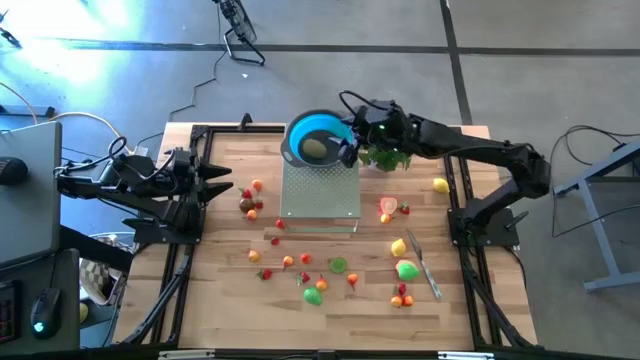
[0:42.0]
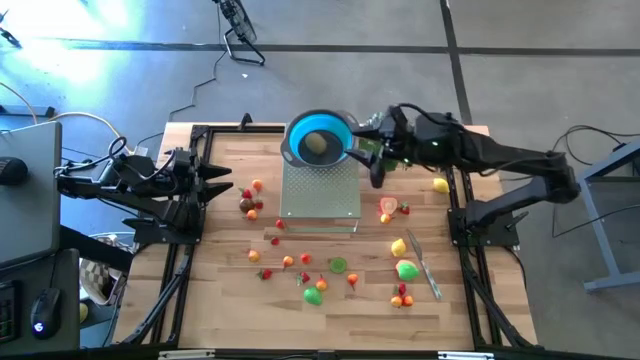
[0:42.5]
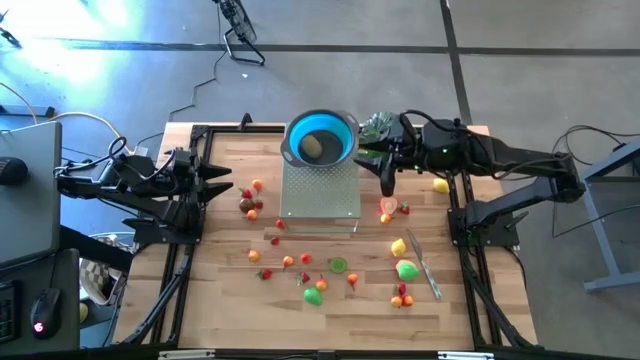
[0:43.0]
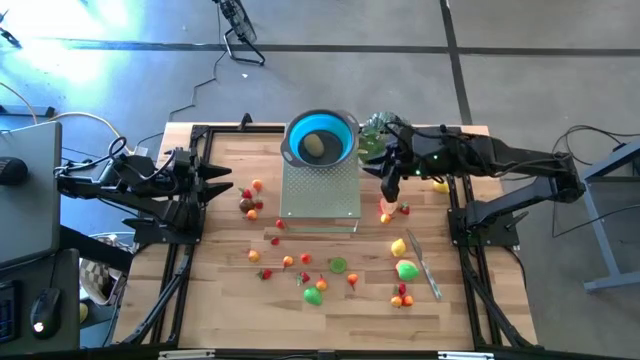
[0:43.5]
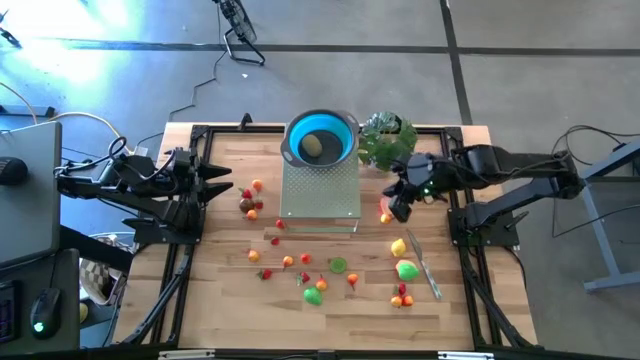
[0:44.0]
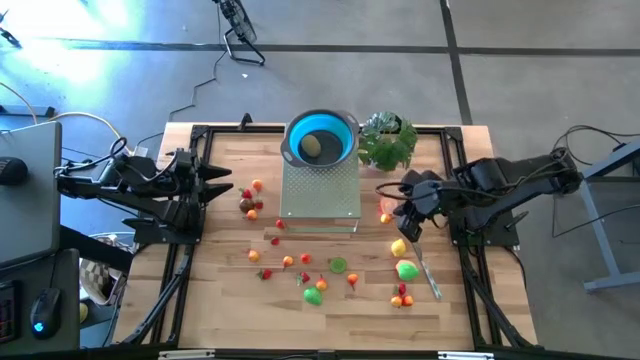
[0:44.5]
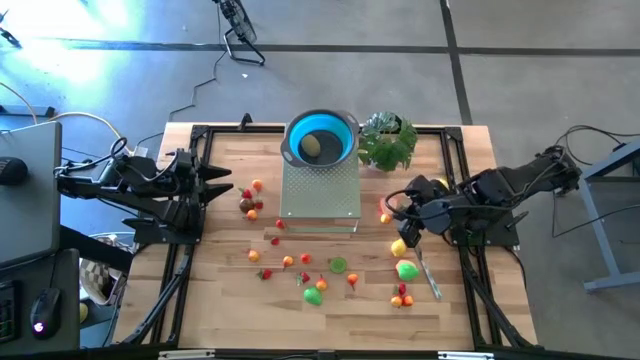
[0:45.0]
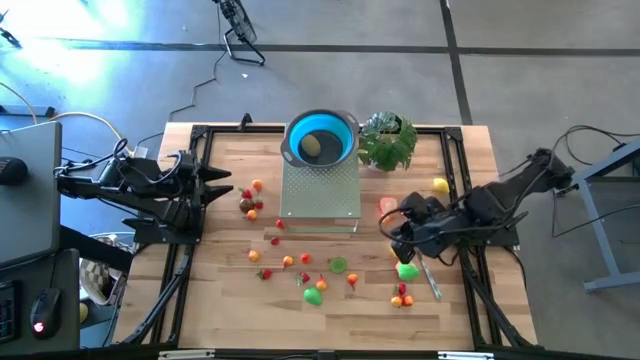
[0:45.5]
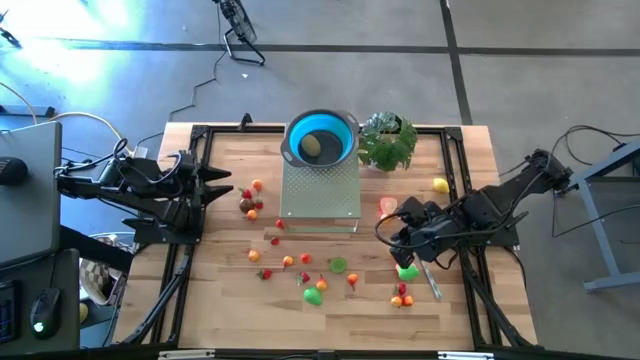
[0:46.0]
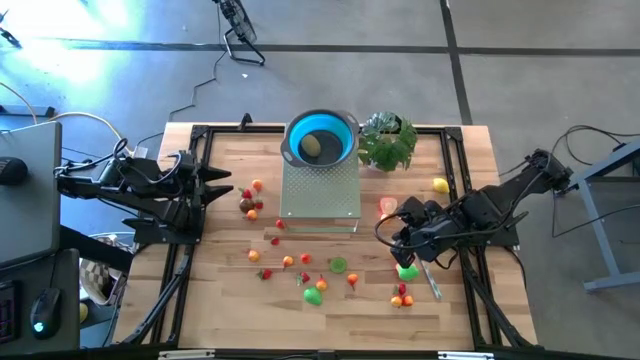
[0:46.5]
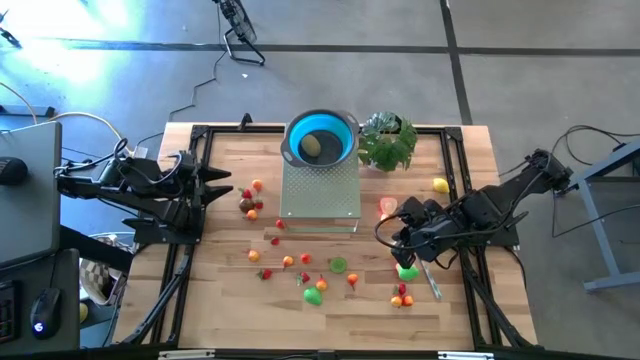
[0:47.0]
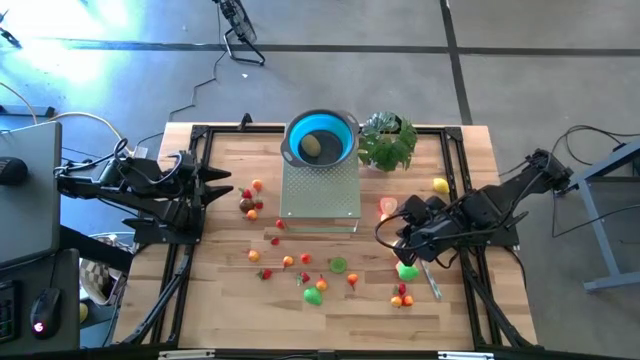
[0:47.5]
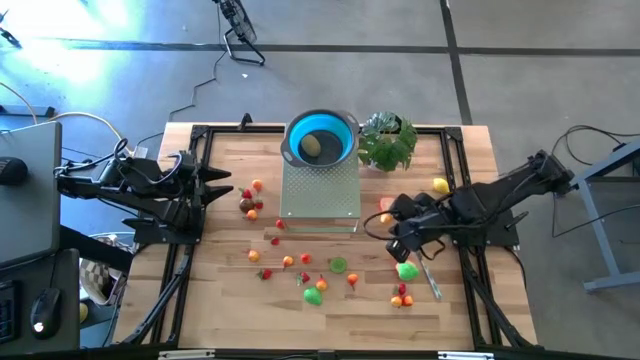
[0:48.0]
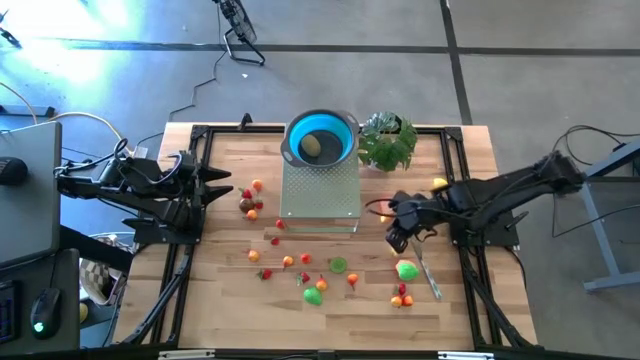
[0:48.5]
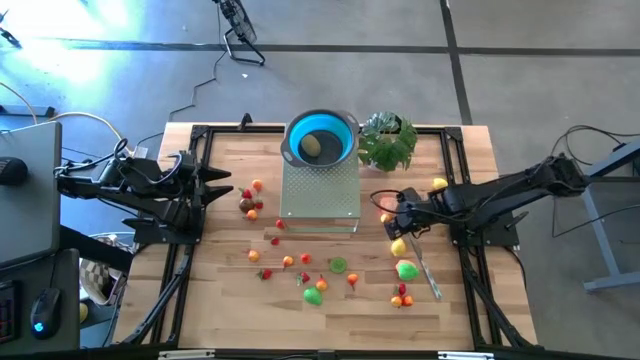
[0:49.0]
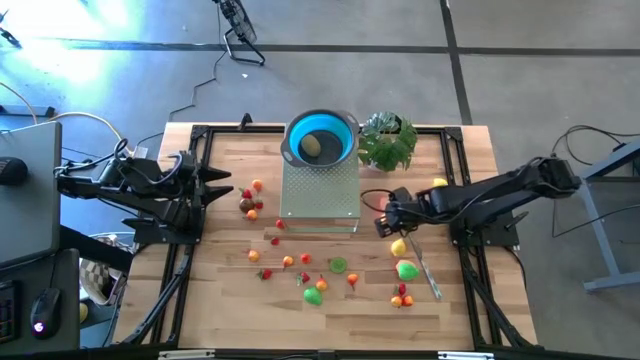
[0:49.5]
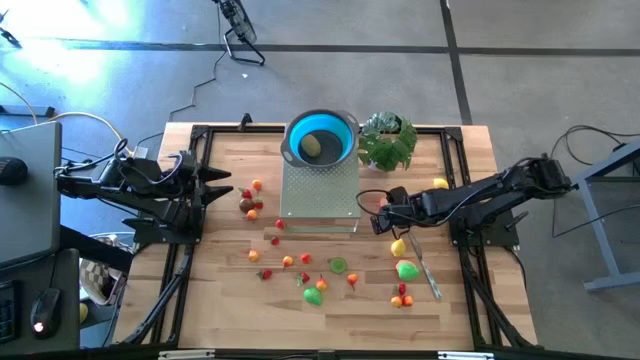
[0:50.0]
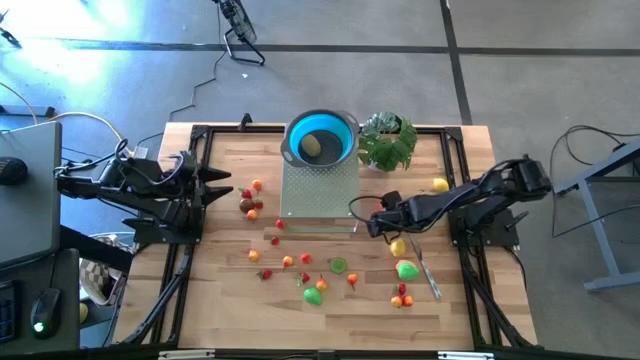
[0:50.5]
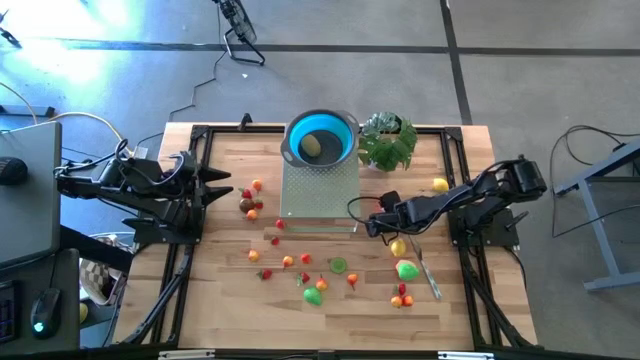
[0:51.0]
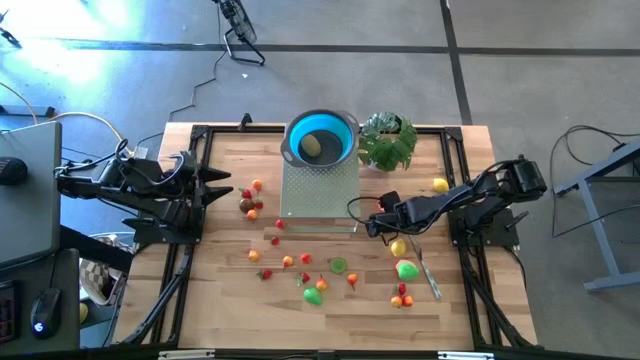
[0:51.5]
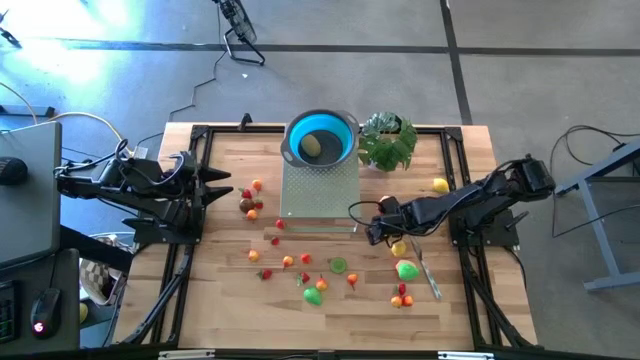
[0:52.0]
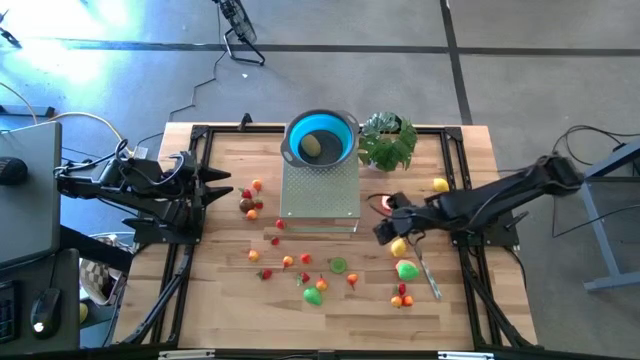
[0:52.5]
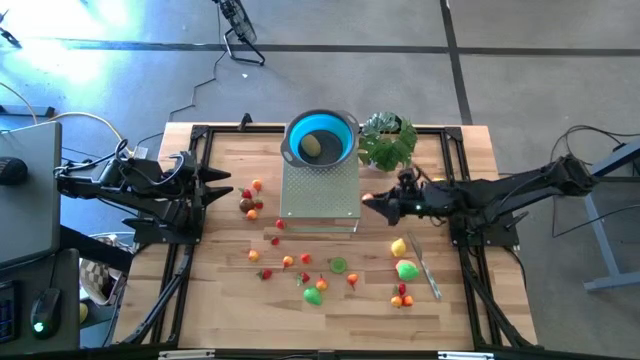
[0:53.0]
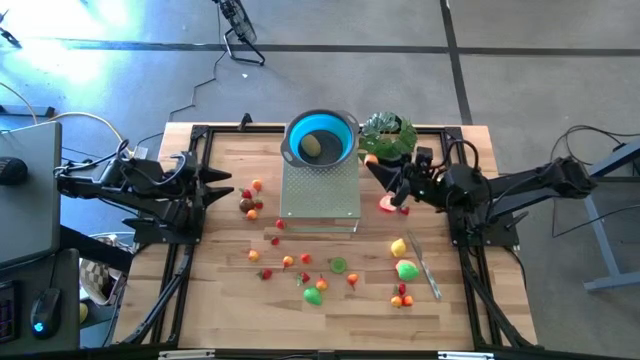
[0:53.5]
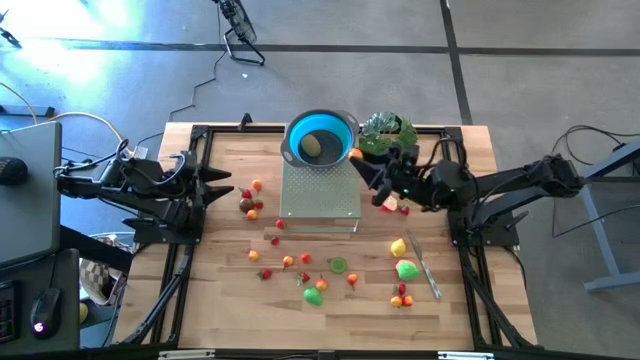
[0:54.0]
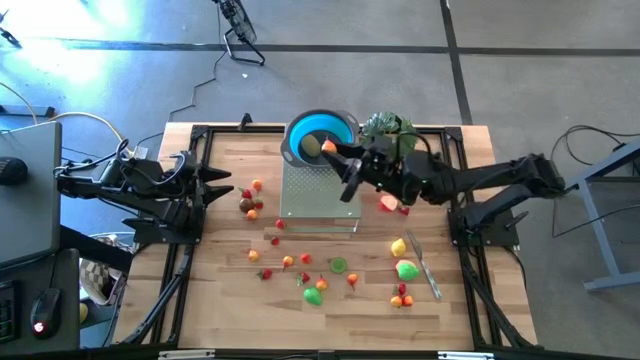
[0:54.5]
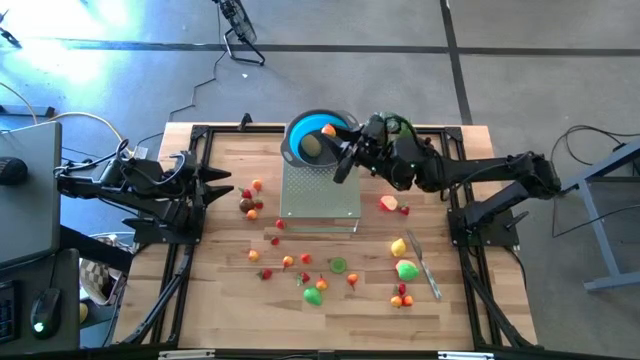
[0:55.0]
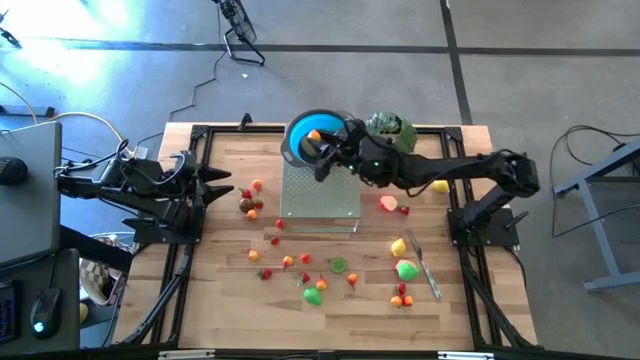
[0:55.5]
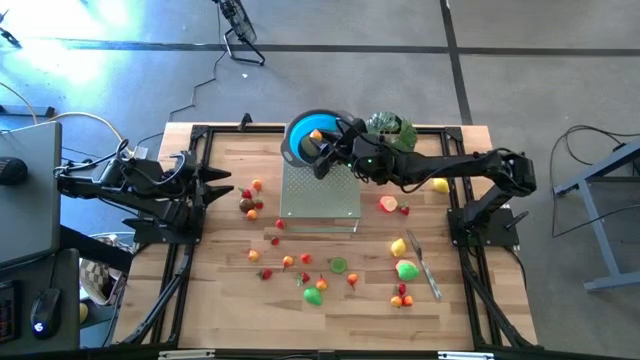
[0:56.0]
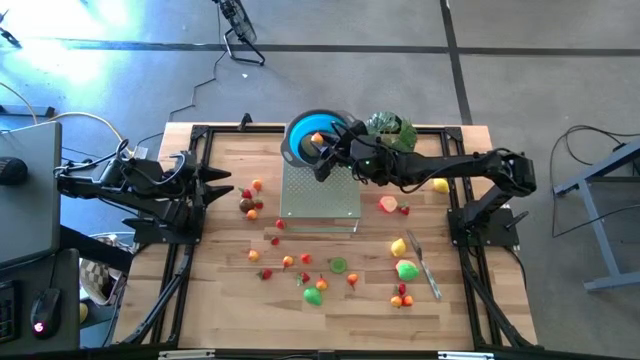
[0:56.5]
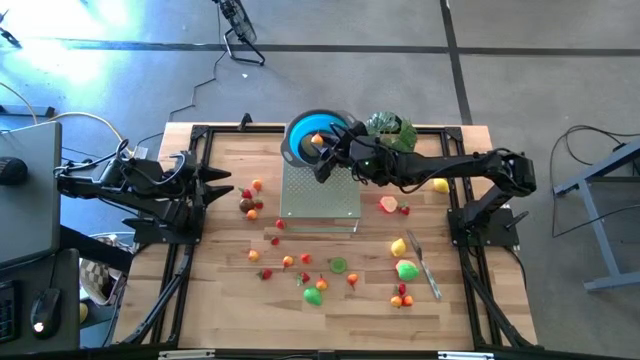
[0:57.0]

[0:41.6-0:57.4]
Task: Pick & Place Fruit
Put the orange peach in the blue bowl on the shelf

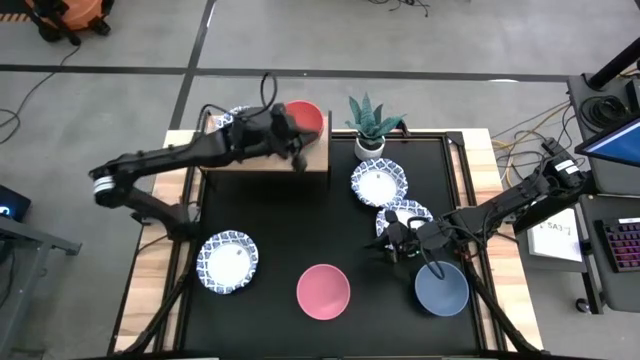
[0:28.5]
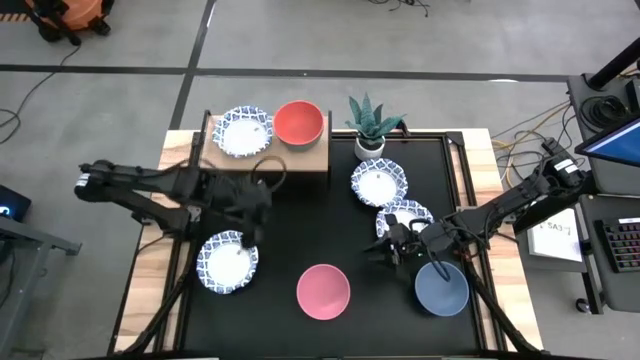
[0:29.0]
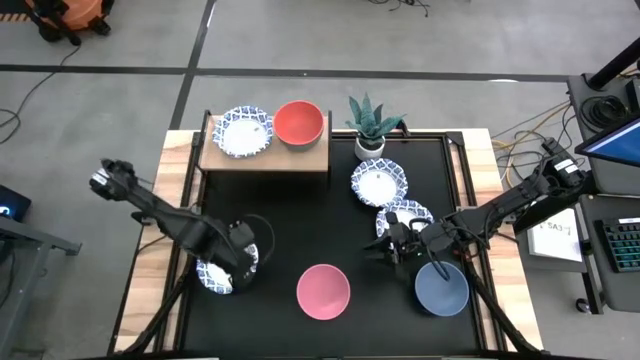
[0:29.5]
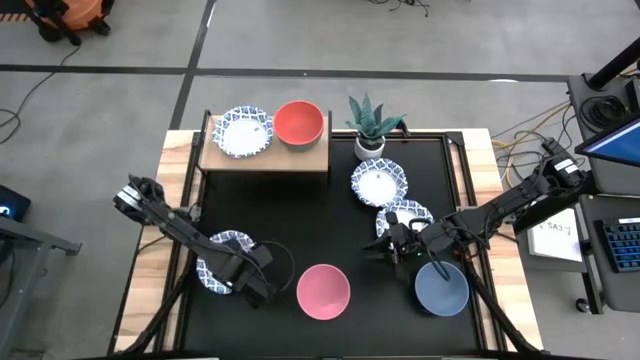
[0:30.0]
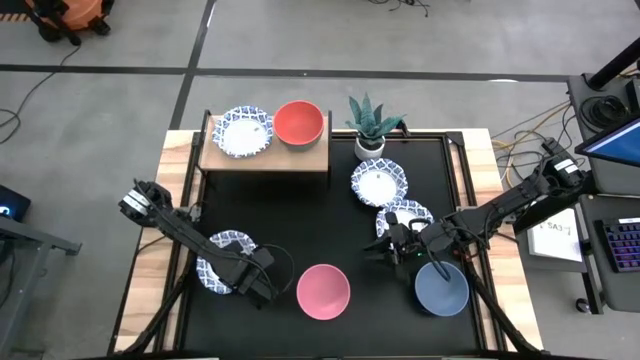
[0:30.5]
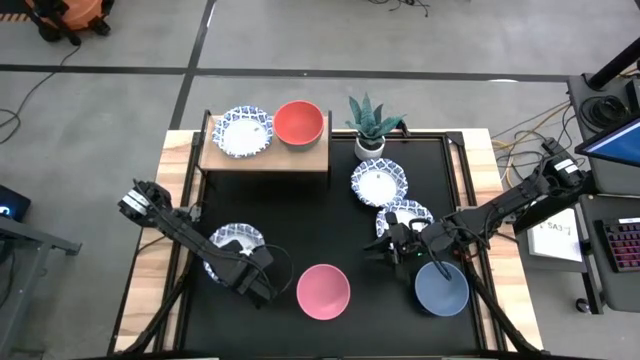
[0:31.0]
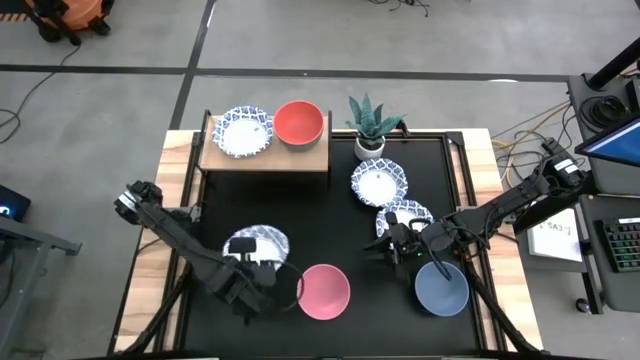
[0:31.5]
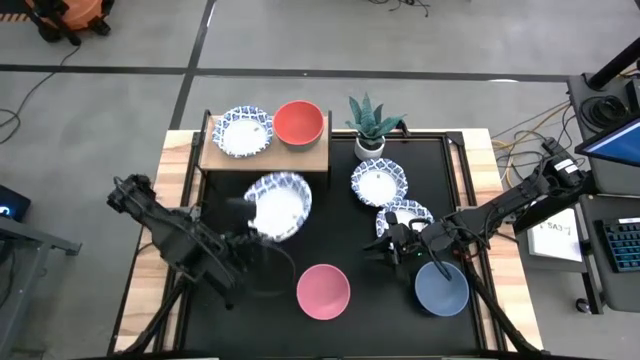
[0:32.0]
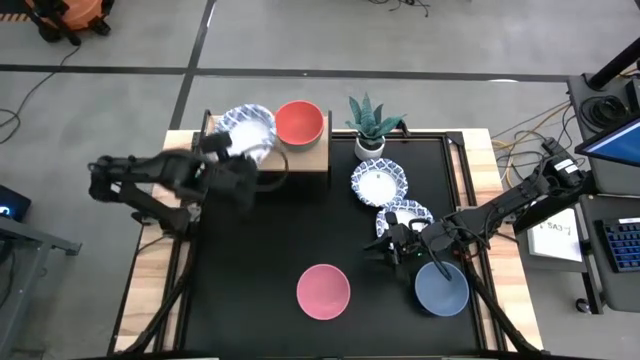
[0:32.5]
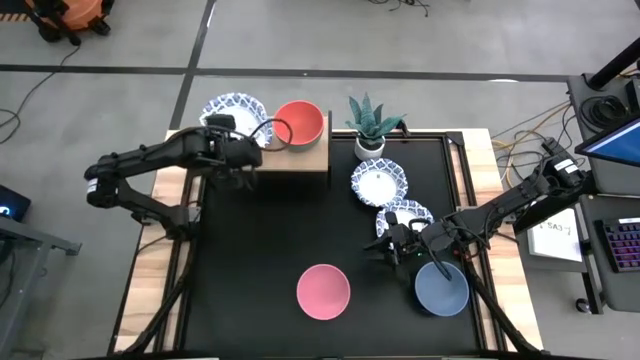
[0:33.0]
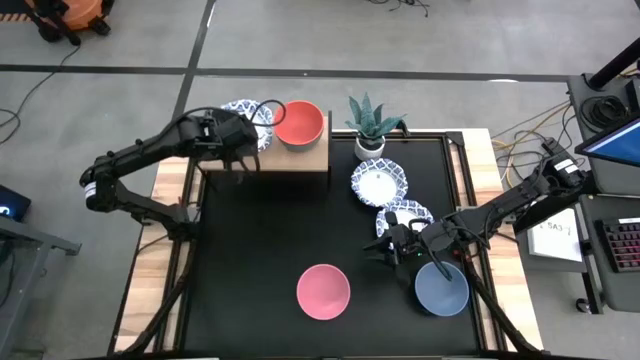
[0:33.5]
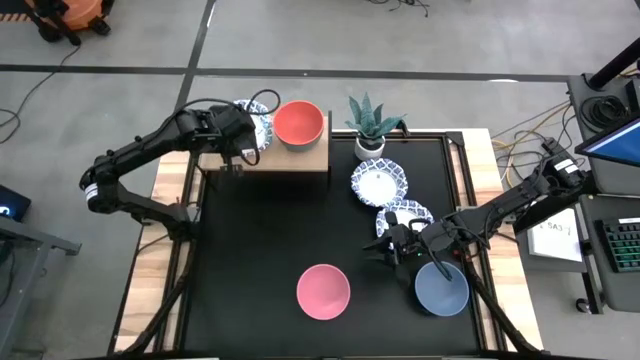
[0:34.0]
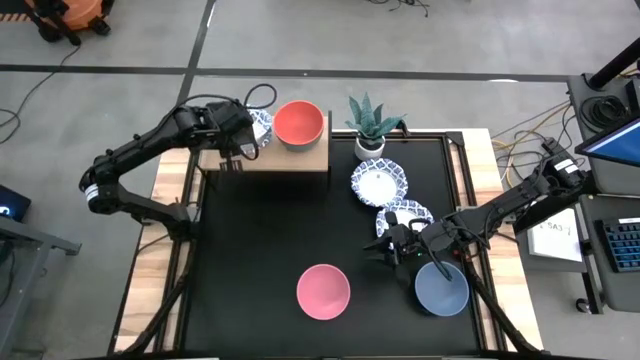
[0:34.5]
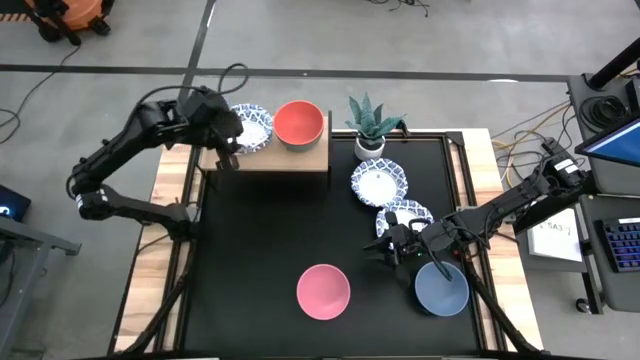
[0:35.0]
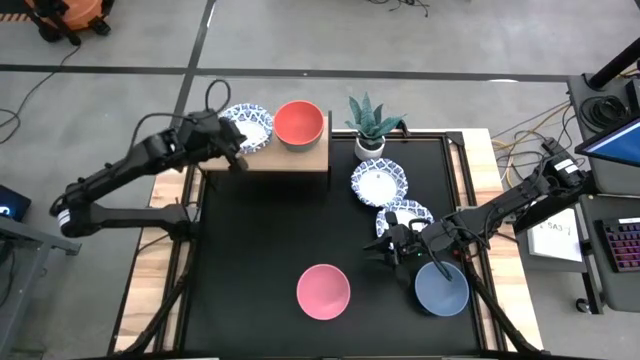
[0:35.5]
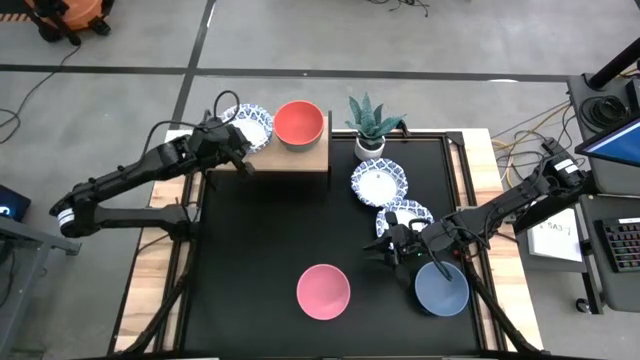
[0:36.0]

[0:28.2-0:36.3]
Task: Place and stack bowls onto a shelf
Stack the white bowl on top of the white bowl on the shelf
